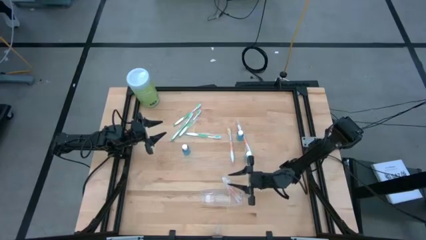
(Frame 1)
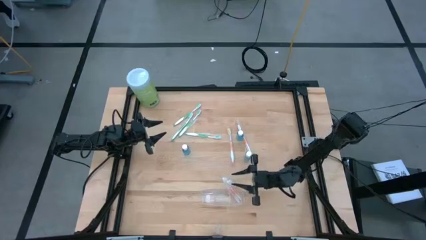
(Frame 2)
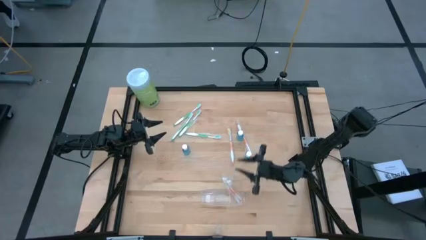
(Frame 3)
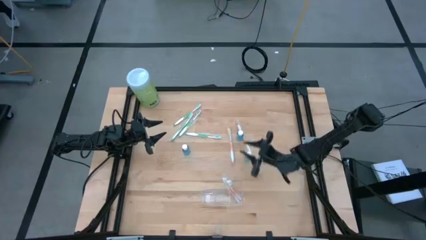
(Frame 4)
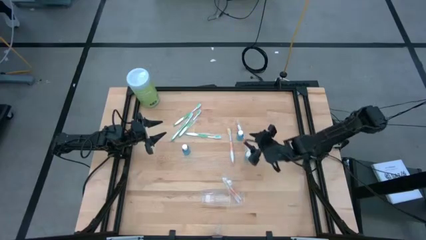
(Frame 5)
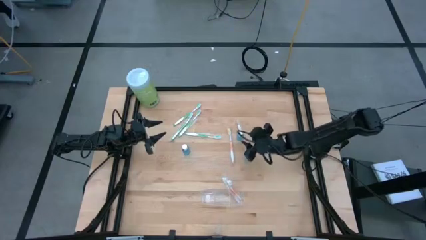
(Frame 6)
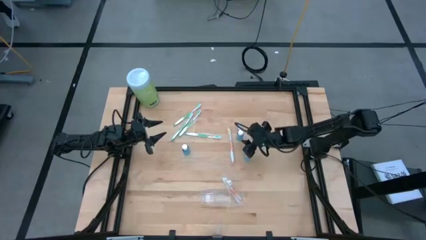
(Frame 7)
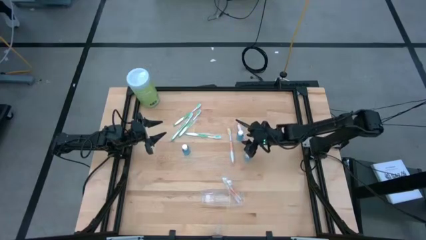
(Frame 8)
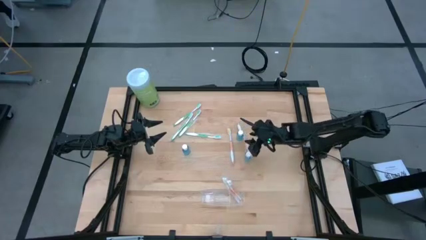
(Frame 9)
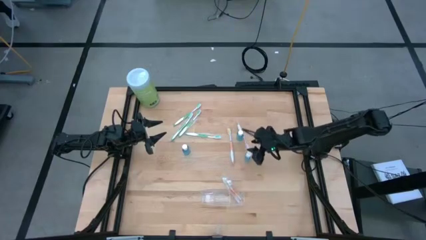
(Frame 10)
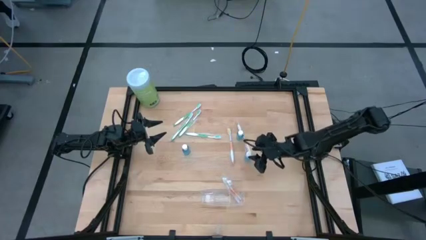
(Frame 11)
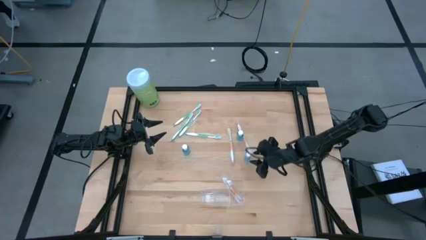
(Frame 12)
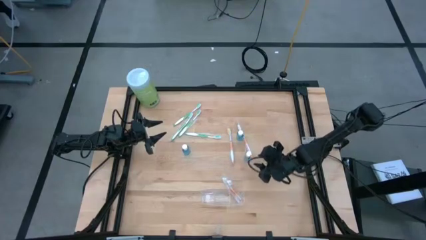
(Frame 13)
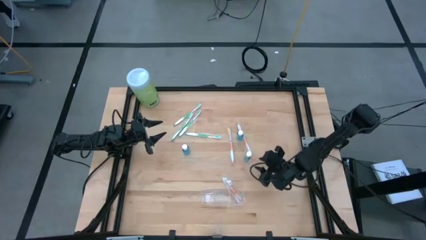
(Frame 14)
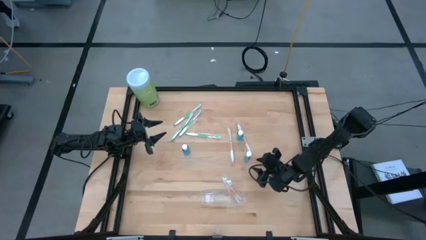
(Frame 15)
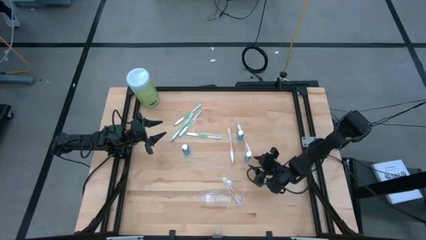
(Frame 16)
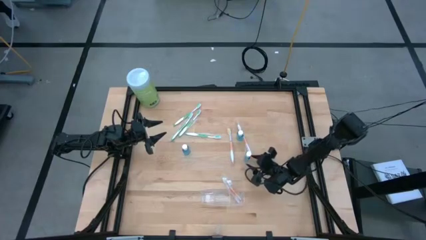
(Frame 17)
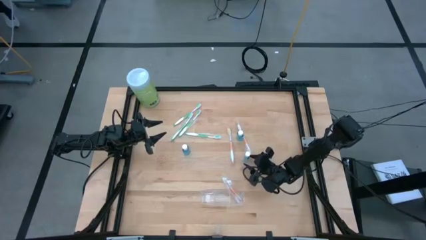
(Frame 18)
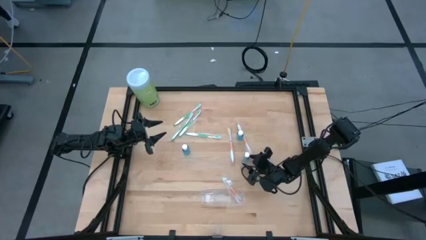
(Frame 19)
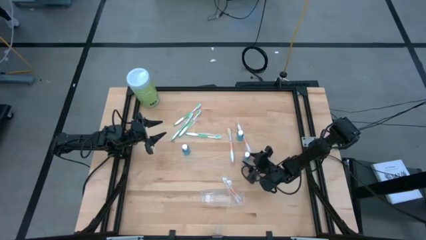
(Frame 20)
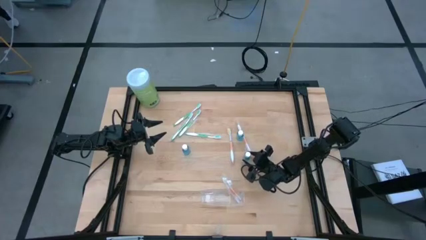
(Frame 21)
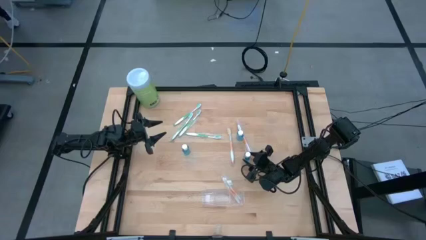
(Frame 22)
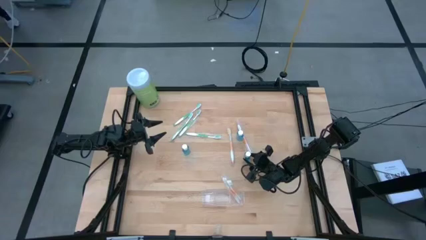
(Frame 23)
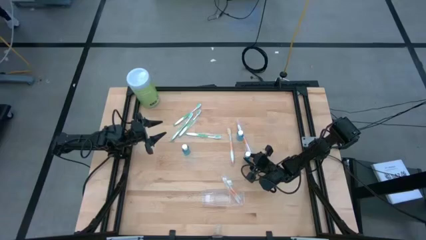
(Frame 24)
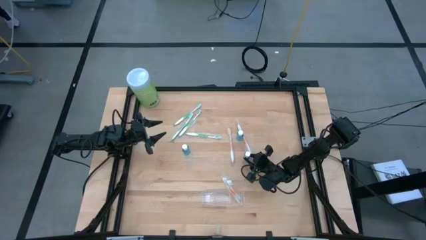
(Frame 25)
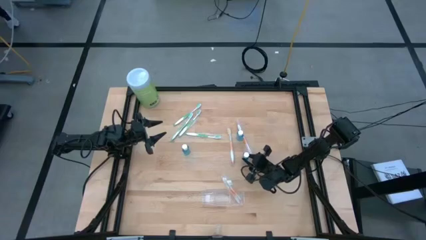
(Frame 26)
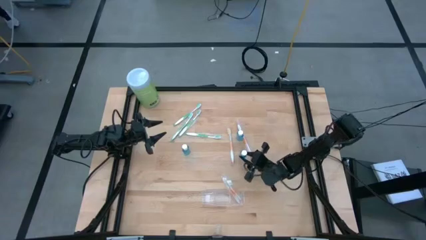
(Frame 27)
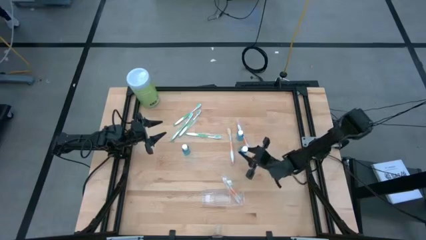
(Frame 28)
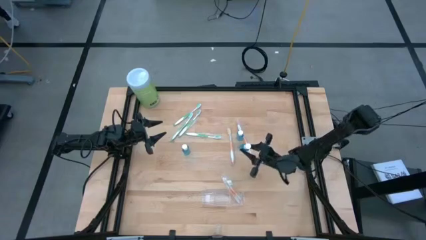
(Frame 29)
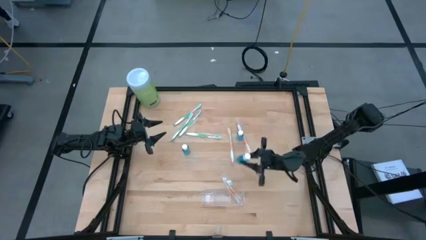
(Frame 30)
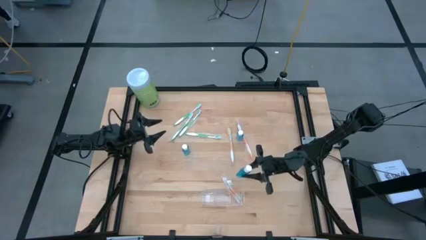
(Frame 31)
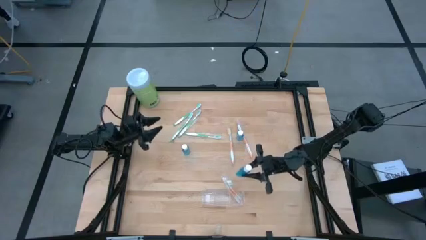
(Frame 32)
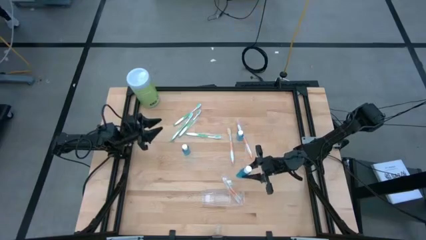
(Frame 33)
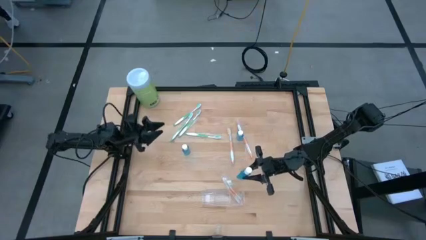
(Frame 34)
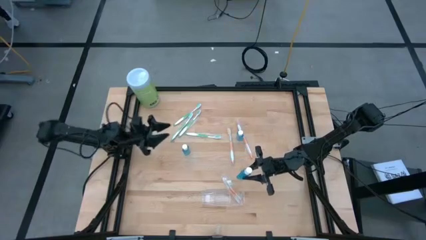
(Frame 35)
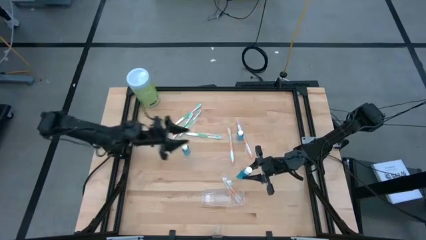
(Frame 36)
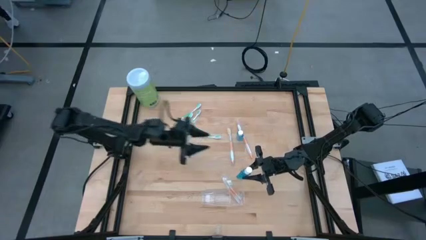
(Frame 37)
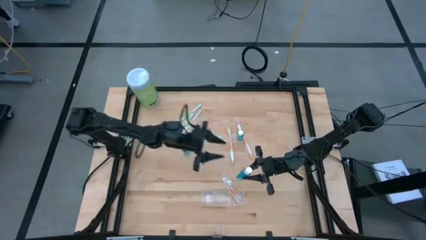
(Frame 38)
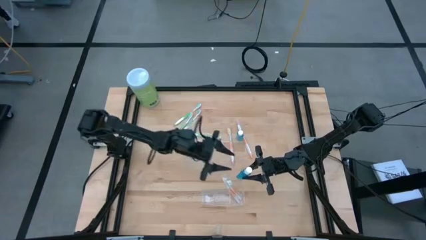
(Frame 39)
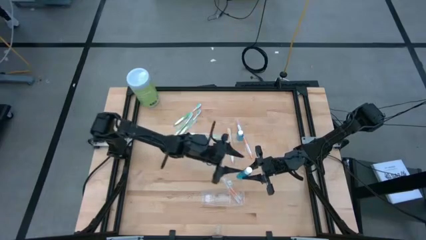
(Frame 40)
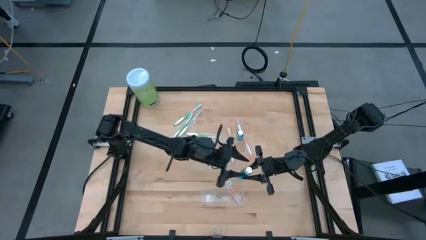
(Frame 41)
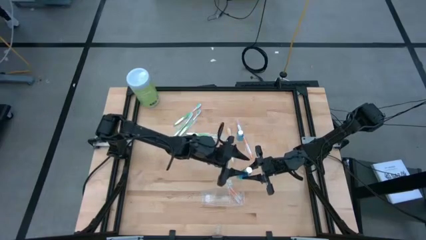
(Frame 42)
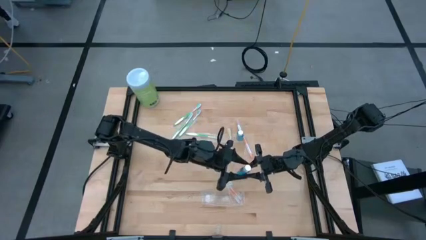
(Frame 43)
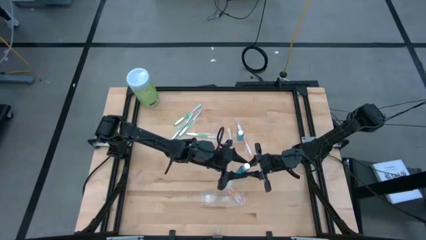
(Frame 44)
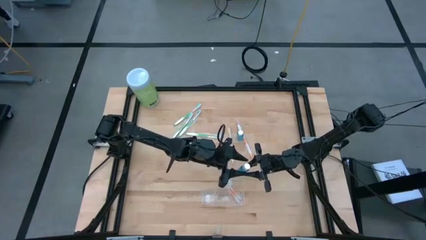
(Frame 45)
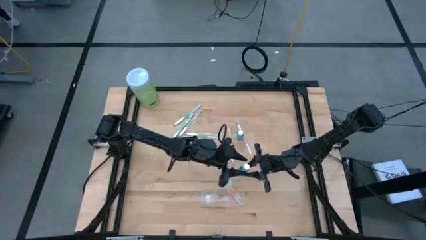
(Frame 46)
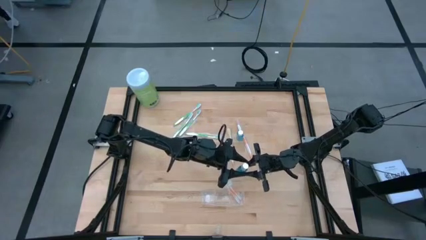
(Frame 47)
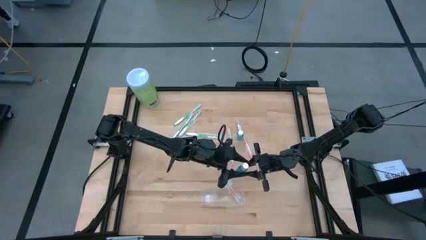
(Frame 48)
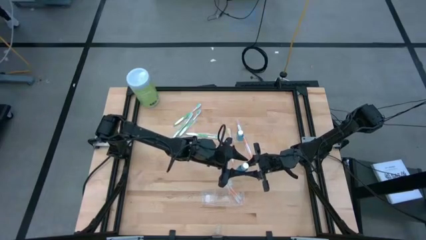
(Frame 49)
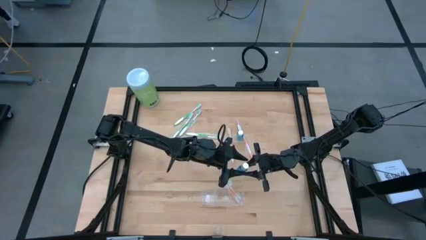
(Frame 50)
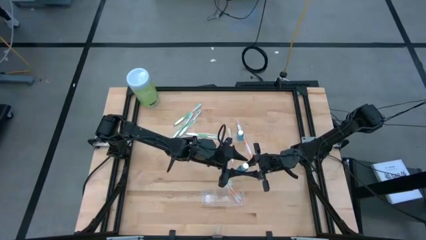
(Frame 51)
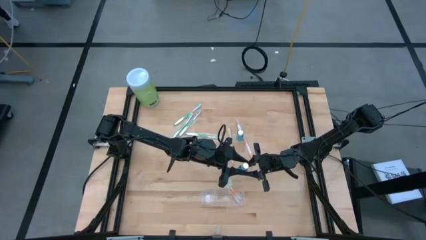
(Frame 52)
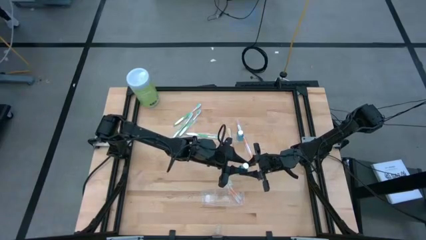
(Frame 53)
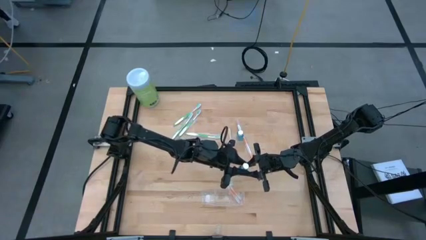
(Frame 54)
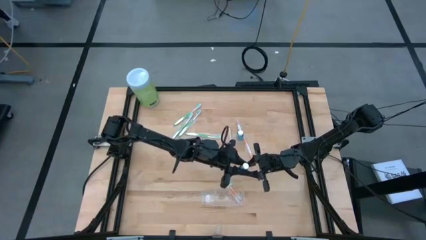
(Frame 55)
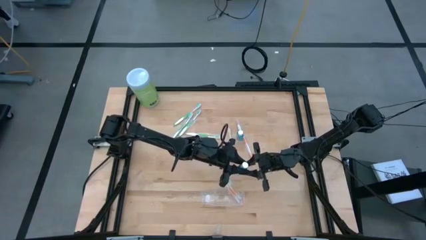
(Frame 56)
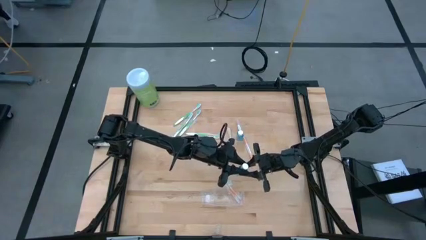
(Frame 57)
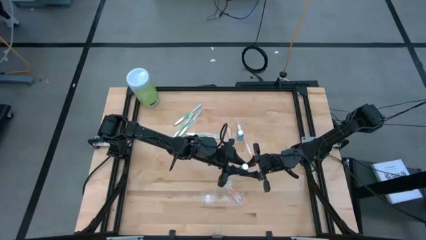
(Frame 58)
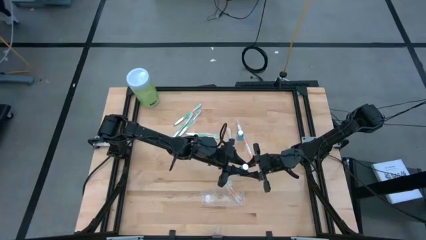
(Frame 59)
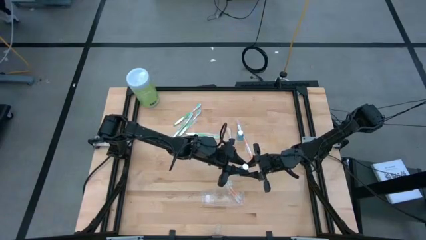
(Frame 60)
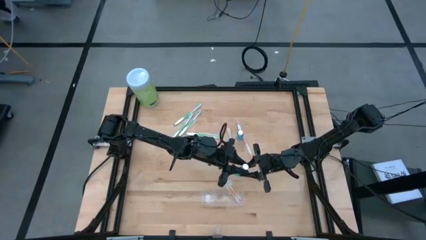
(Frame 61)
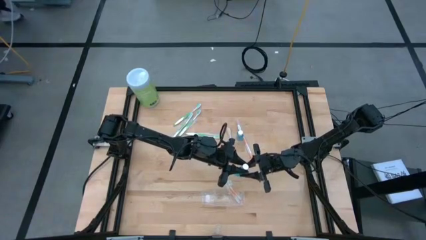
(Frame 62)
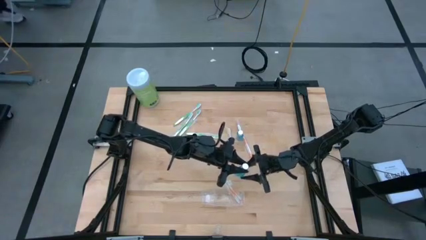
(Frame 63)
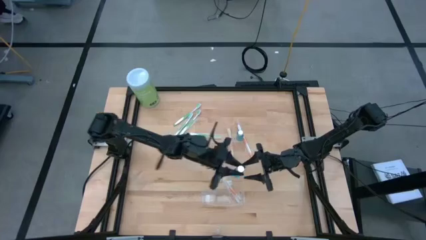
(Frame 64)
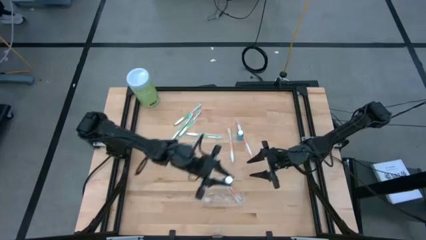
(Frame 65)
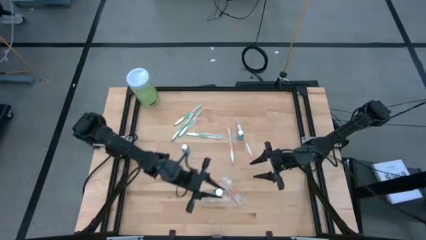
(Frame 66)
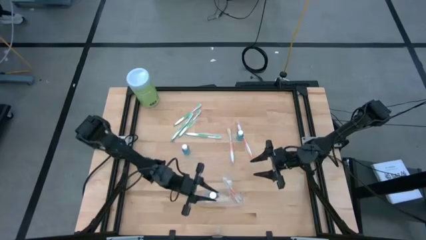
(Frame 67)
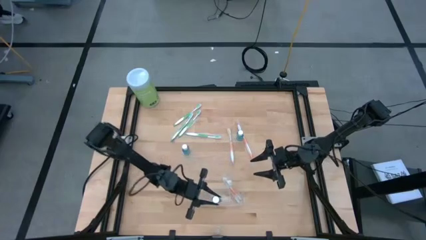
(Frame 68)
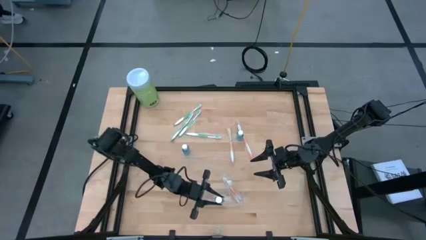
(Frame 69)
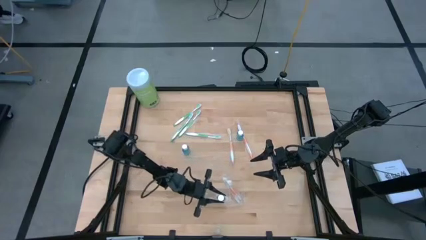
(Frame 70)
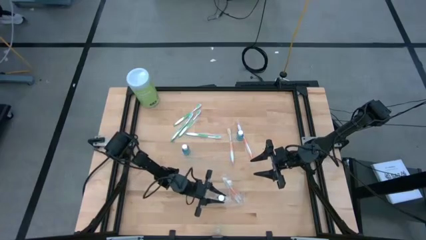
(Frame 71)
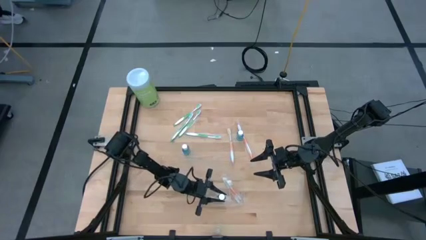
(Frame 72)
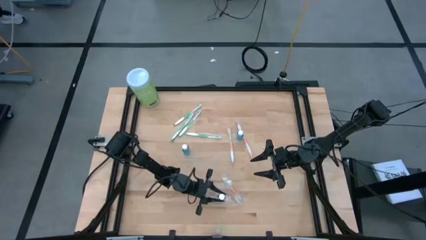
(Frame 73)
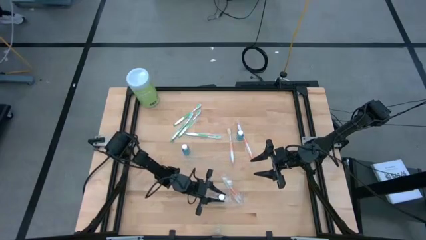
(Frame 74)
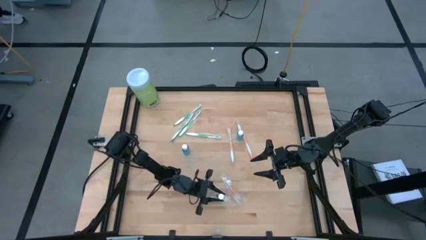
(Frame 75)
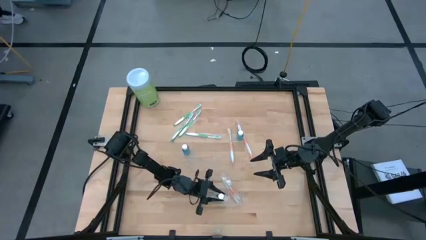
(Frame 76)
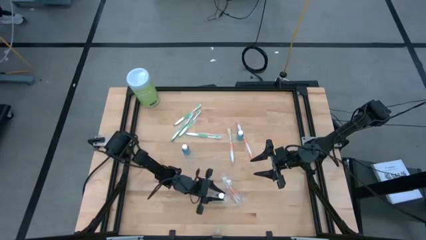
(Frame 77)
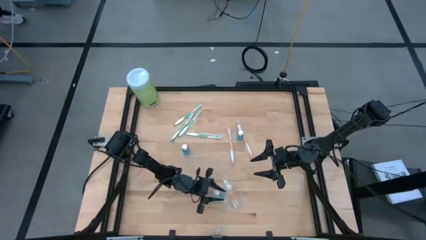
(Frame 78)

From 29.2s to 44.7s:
Task: Pick & Place toothbrushing station
Put the mouthwash into the transparent organizer

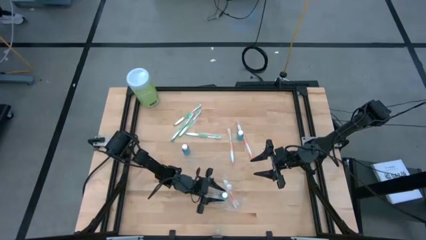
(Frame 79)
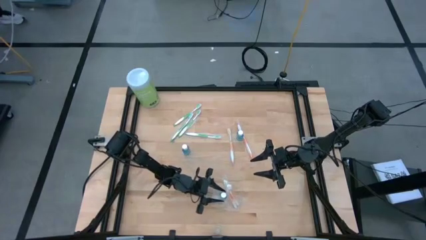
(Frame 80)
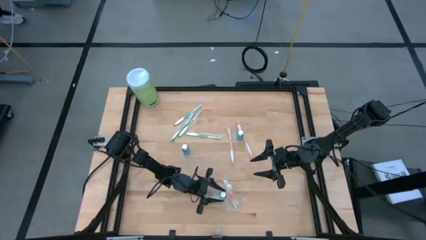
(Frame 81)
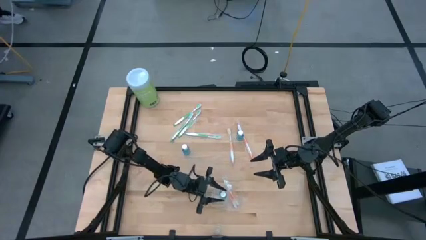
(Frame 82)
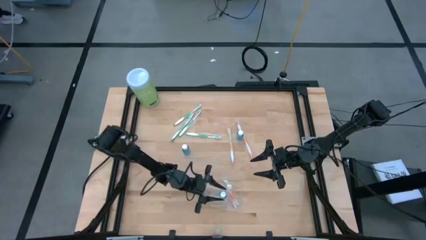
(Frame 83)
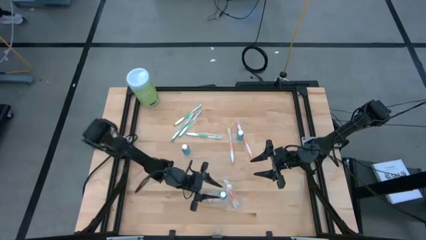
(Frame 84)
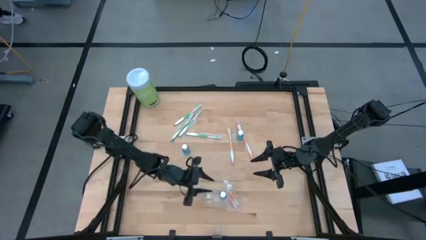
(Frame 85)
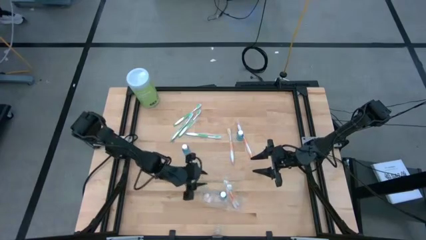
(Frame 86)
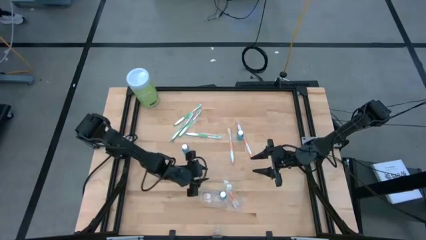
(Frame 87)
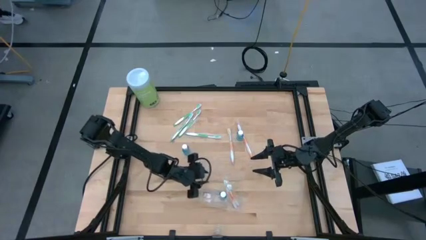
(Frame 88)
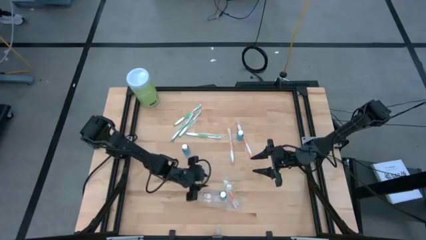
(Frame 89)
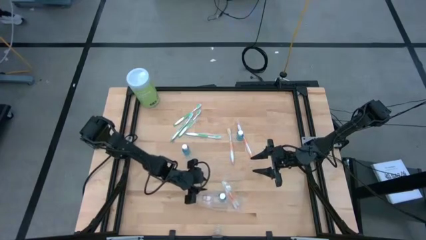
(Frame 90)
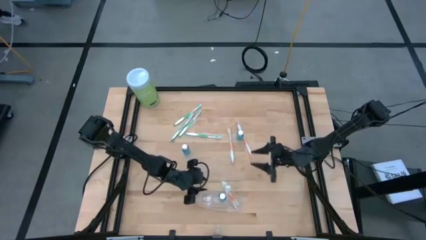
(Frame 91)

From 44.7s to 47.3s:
Adjust the transparent organizer
